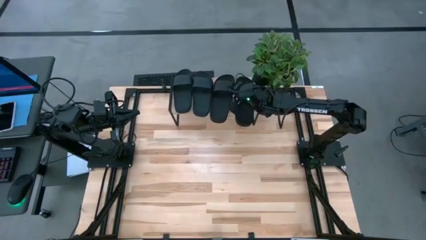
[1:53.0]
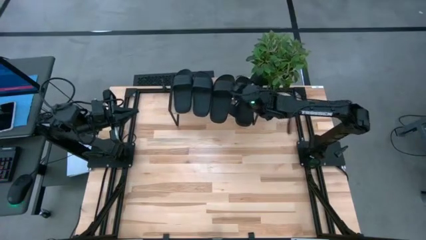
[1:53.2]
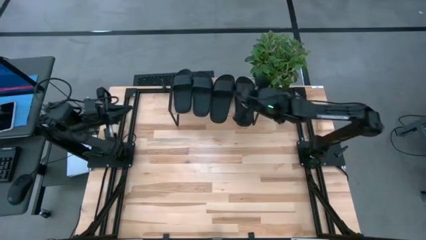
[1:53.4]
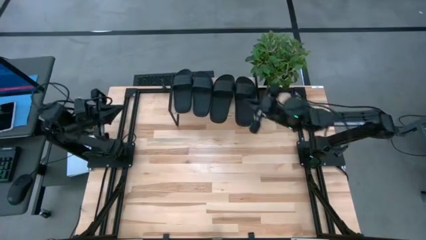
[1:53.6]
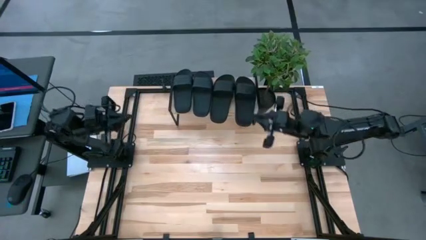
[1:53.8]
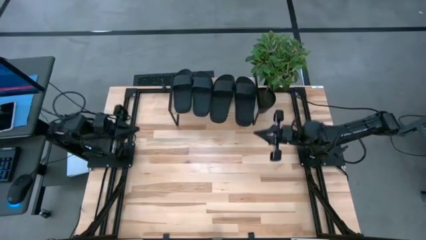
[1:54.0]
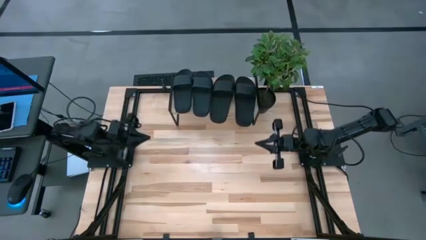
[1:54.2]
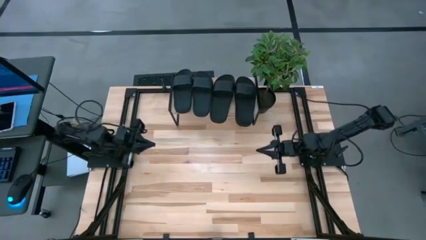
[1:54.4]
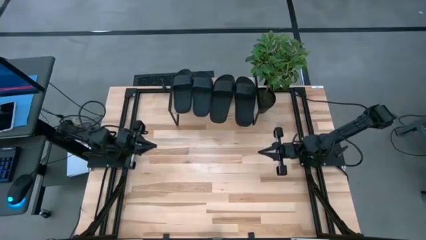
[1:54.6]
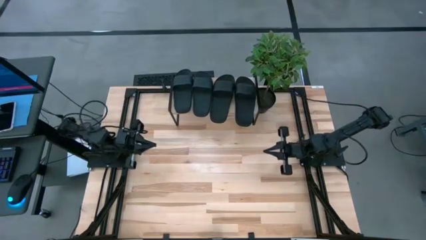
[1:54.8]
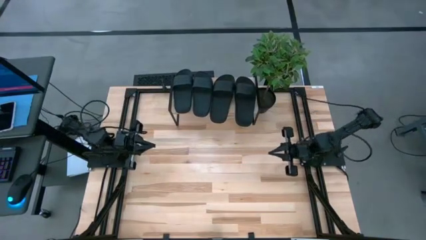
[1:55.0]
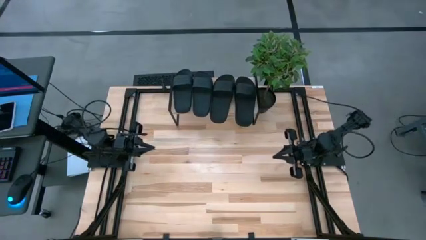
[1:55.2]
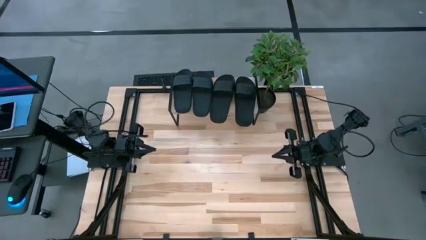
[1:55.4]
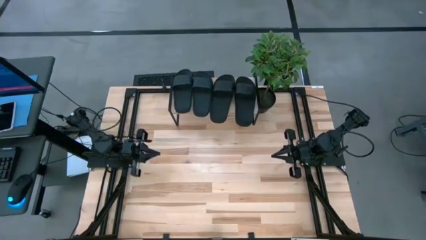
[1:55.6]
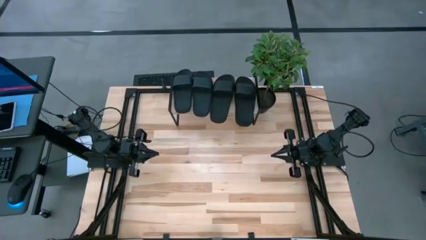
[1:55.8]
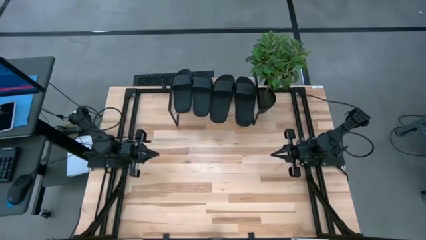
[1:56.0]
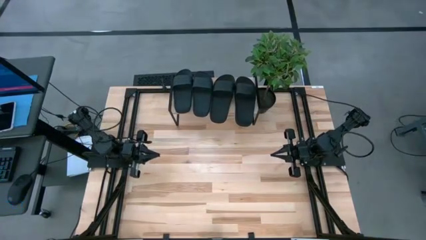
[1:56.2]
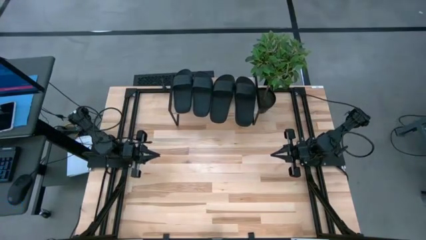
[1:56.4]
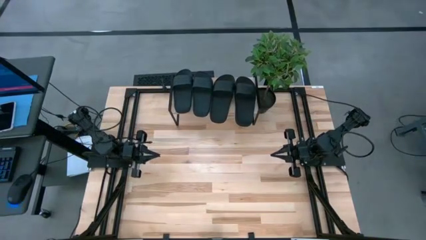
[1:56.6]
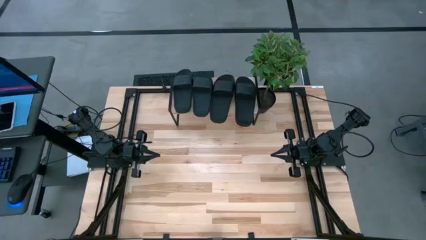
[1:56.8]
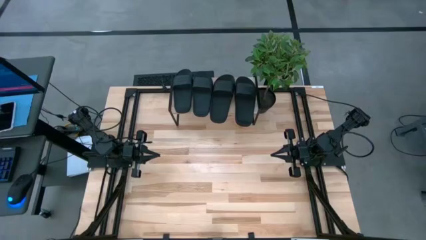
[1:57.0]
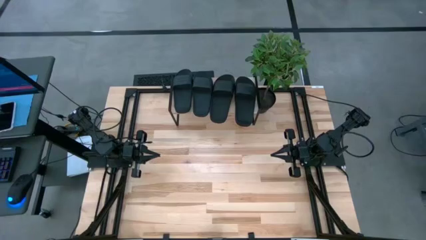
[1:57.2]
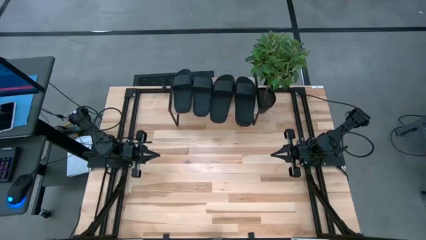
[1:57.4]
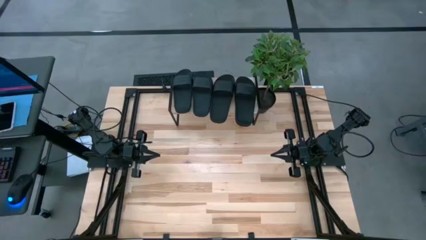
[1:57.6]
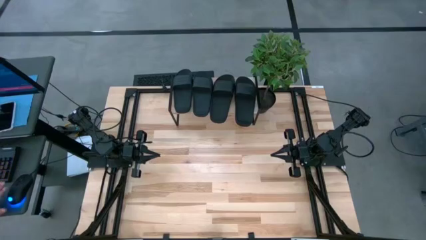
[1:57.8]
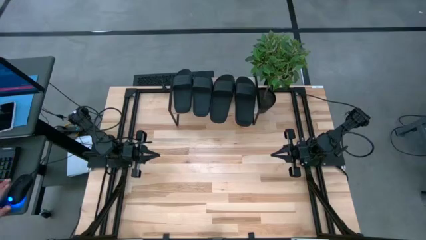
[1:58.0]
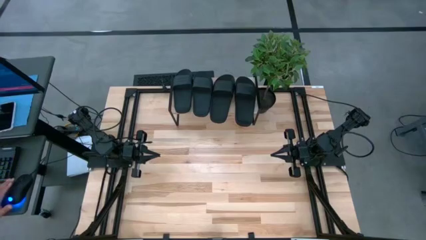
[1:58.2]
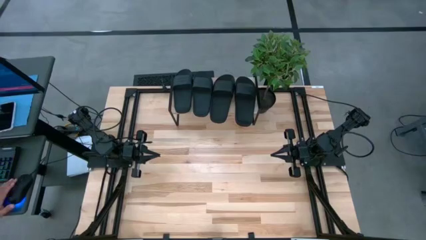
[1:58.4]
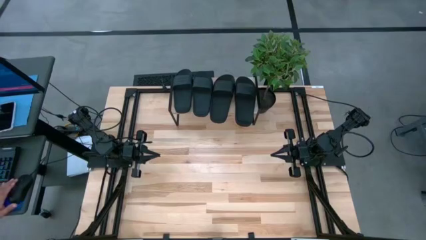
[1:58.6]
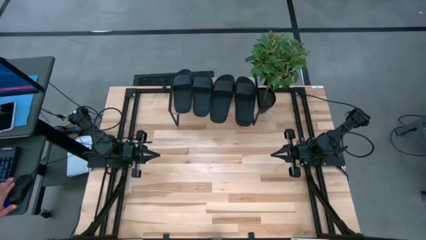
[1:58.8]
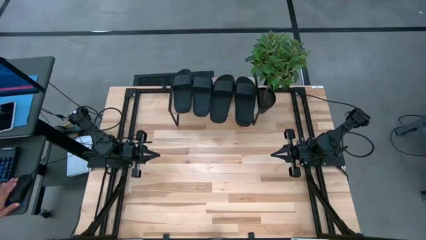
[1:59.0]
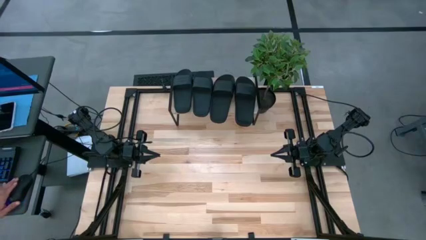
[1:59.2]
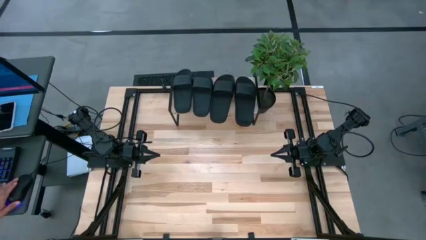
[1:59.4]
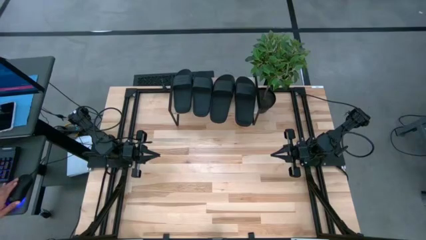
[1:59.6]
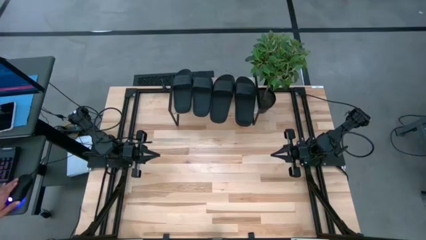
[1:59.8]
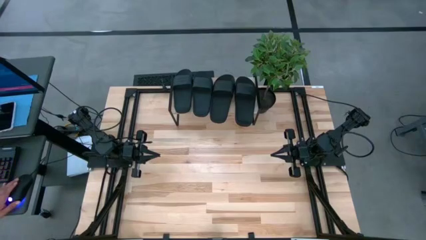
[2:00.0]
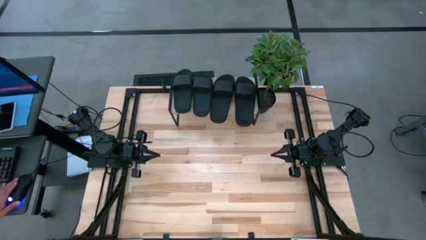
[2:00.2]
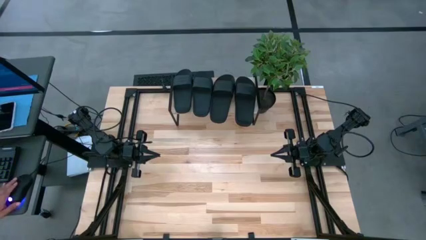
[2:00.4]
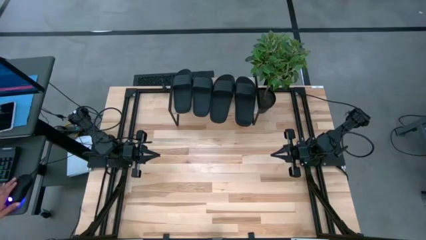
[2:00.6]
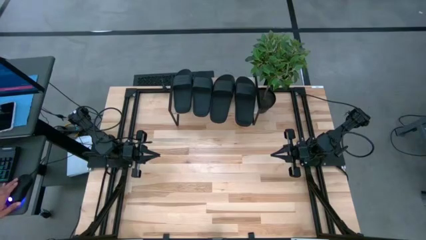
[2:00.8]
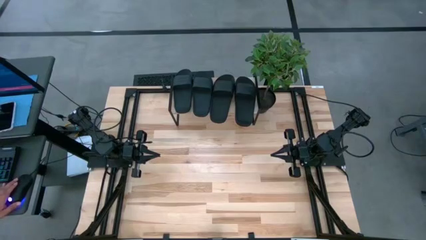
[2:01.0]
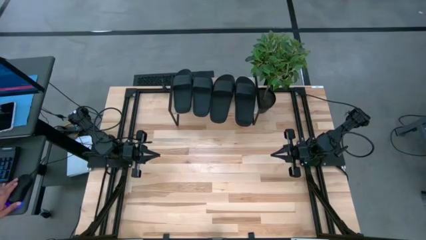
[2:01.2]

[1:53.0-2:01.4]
Task: Pick and place slides into the shelf
Return to Home Position

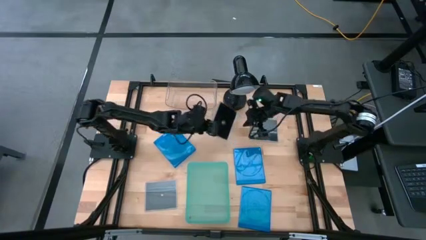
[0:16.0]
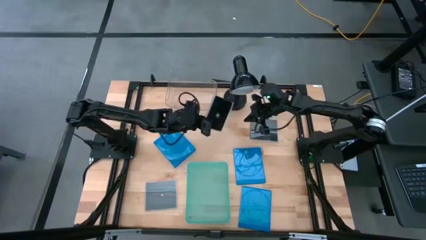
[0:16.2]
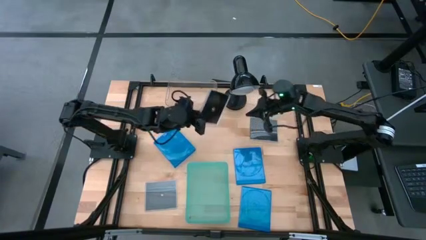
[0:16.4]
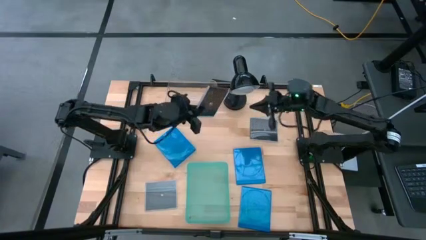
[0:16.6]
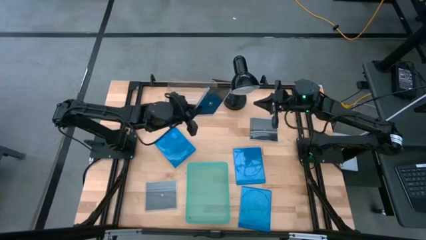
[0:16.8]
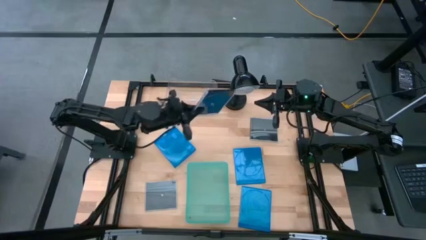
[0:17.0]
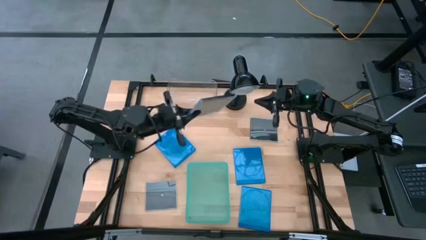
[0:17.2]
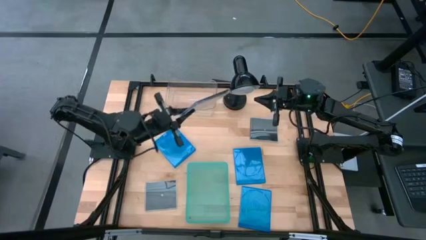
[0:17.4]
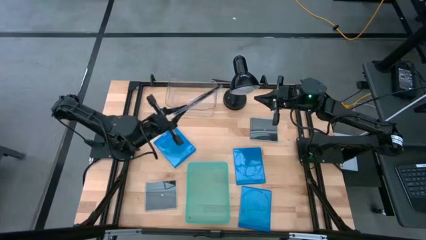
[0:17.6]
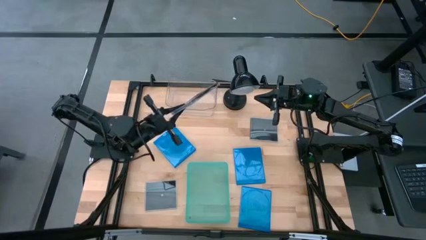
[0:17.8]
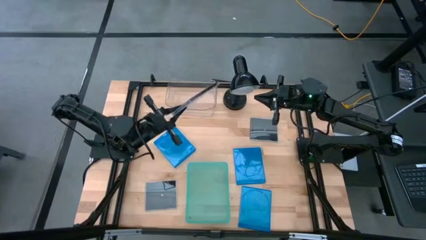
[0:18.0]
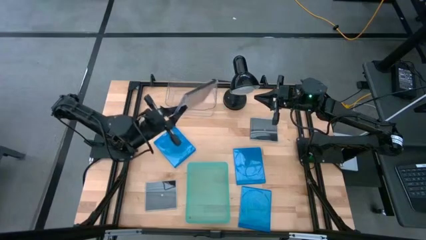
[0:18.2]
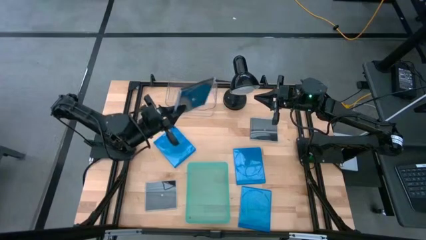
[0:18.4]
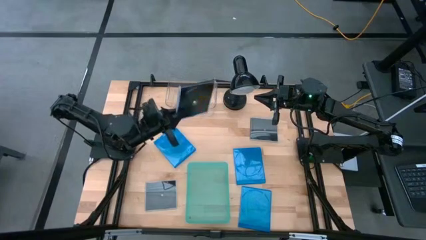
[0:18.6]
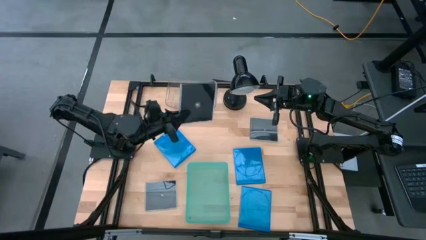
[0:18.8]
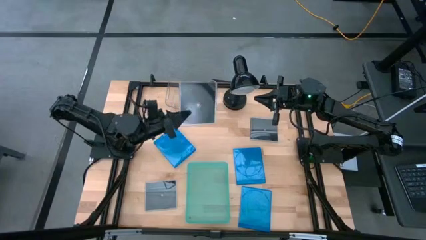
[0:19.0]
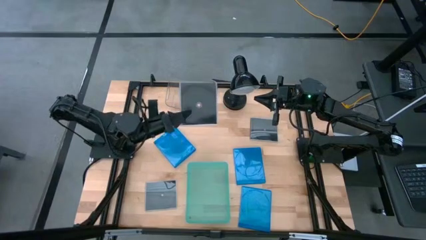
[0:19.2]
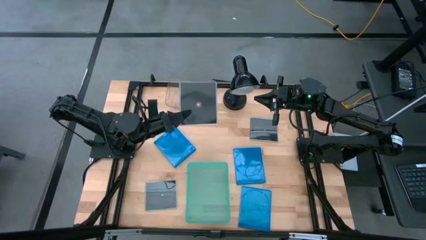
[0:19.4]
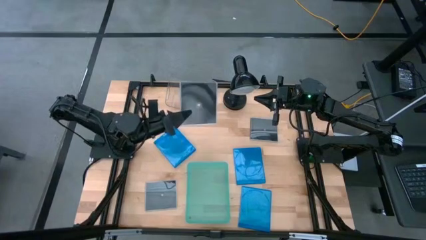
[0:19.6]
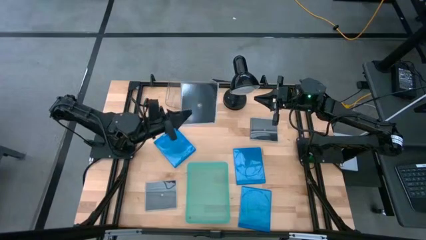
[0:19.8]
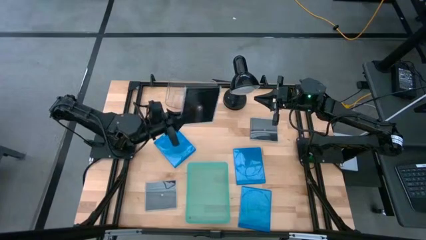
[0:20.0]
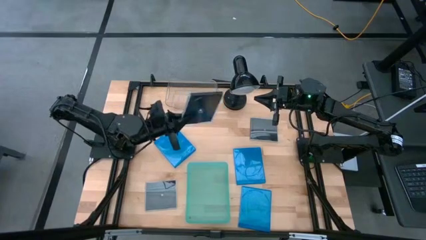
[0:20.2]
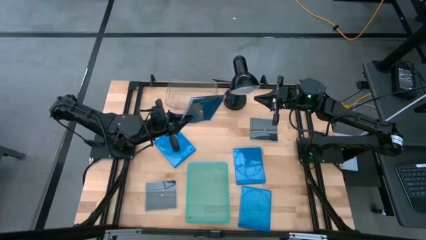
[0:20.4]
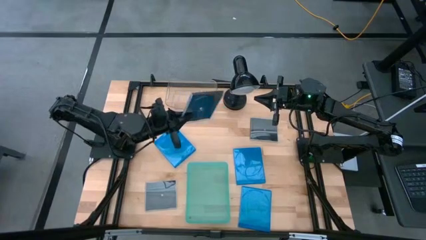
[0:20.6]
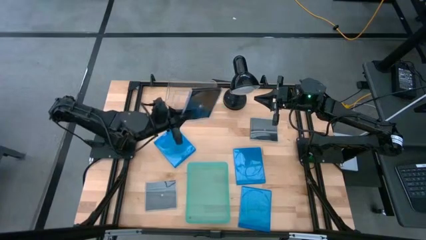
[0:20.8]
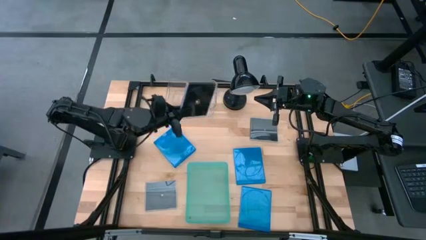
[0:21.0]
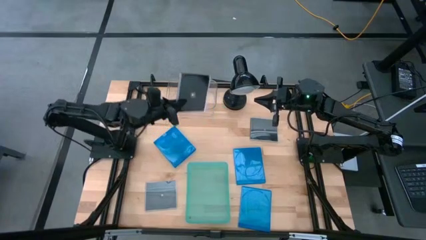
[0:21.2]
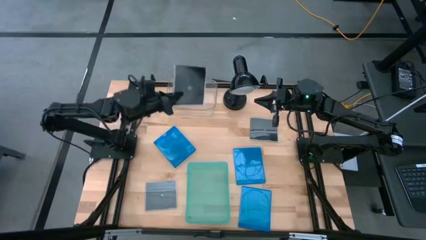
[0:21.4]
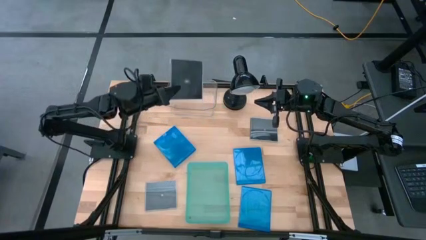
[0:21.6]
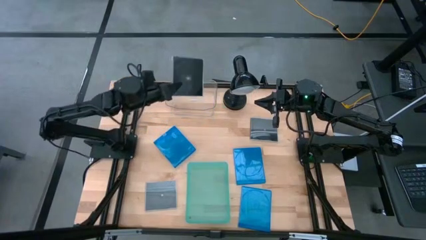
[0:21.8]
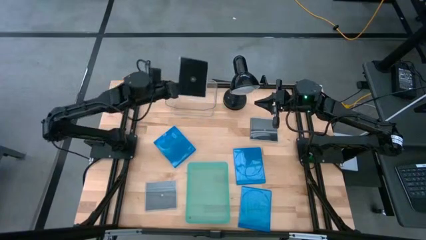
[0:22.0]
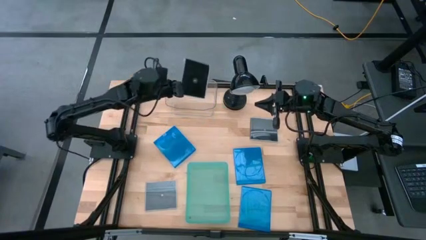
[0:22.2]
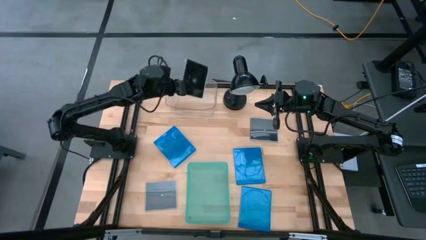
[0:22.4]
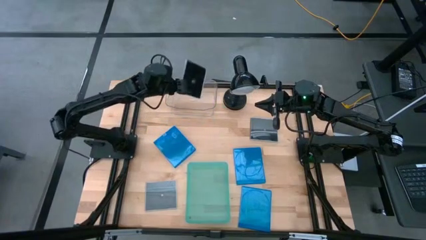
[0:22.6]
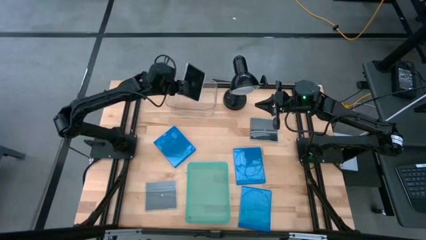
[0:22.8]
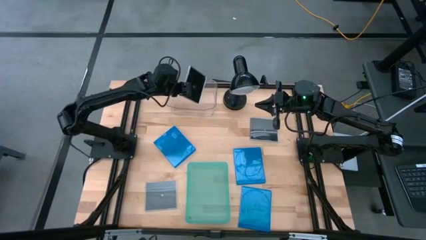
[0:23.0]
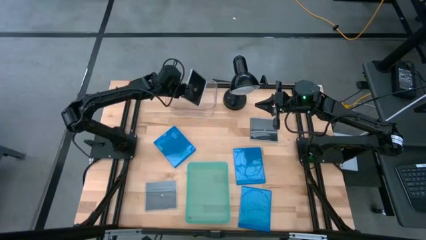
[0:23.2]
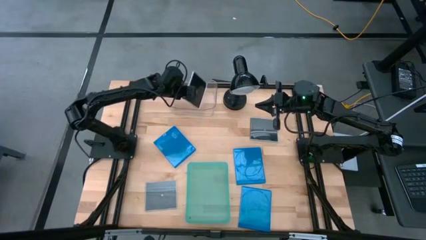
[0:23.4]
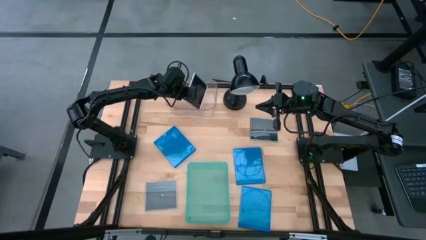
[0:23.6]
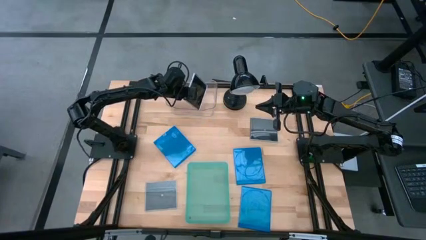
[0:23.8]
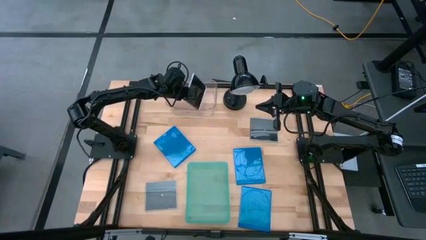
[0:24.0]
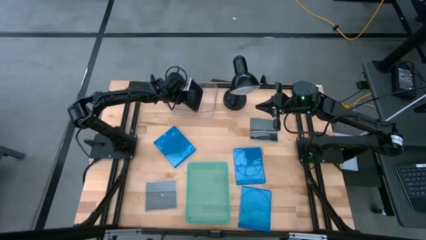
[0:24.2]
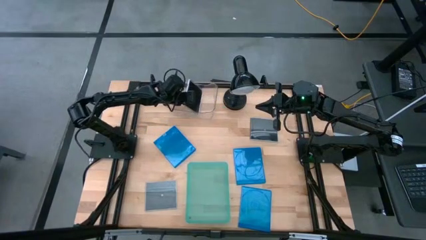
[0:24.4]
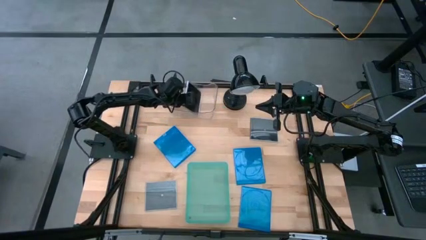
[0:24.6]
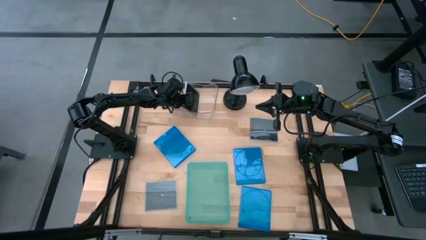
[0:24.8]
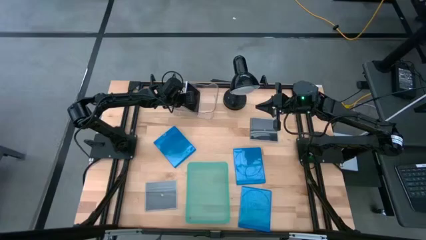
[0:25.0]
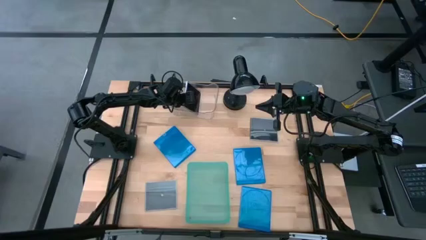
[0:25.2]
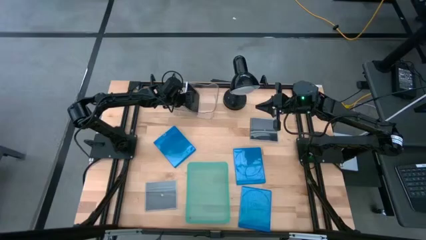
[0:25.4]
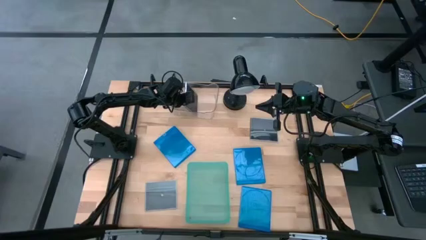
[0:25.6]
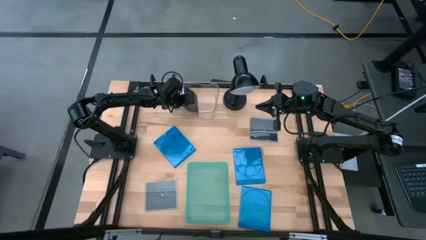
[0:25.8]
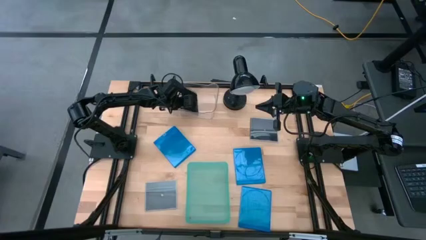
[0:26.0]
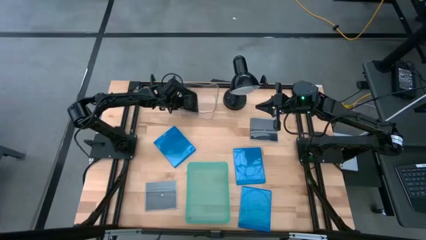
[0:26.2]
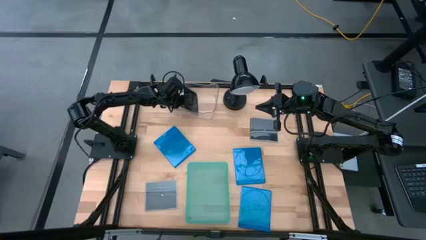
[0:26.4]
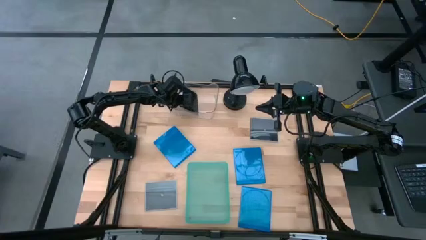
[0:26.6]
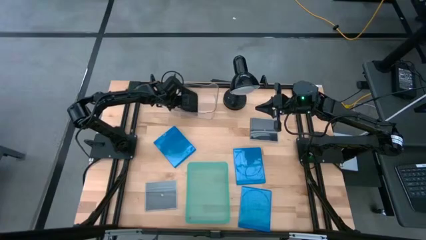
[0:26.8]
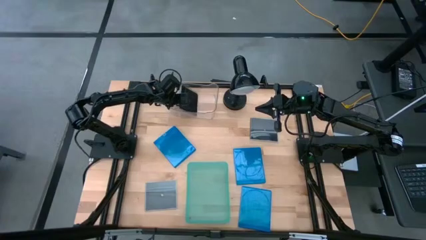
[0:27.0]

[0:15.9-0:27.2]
Task: Pick & place jewel cases by type
Put the middle black CD case into the transparent bin
